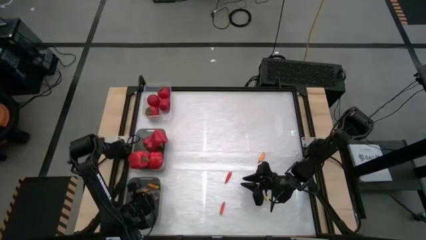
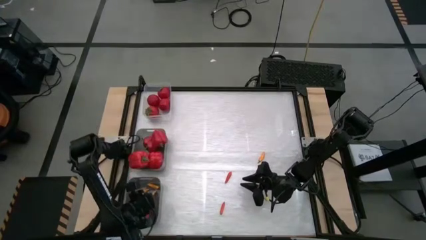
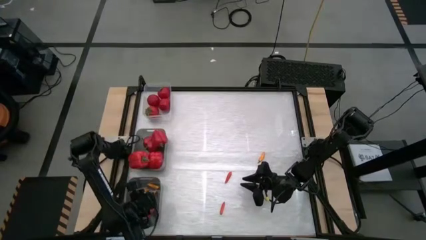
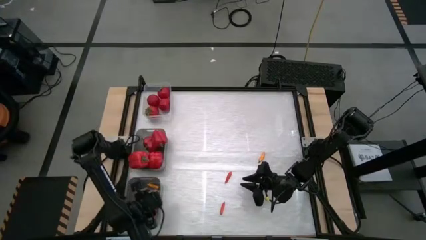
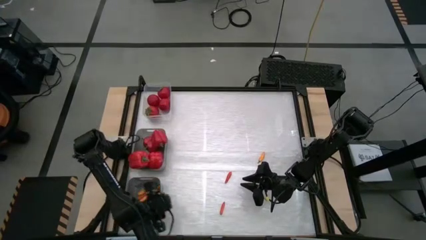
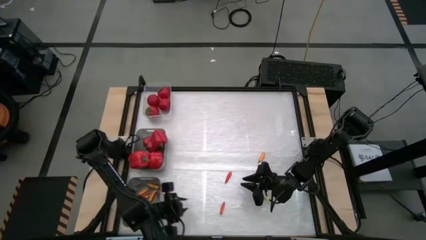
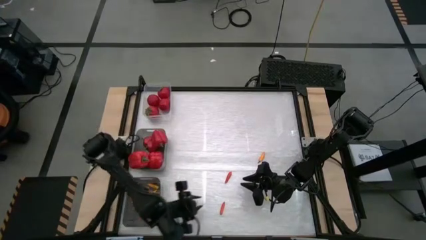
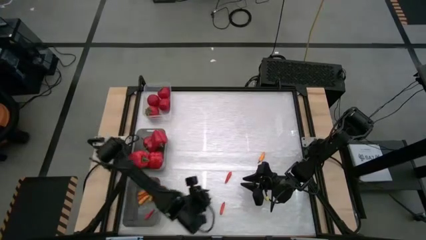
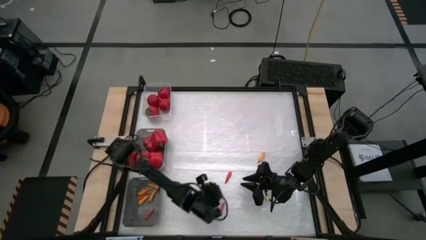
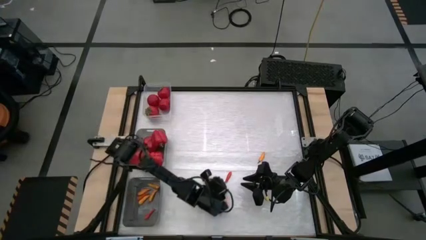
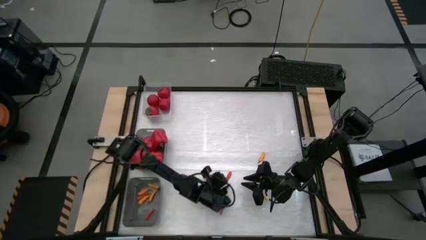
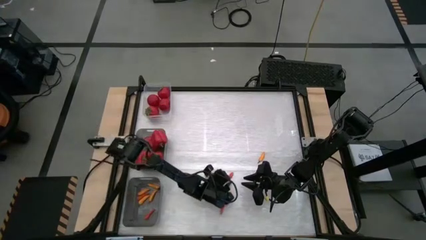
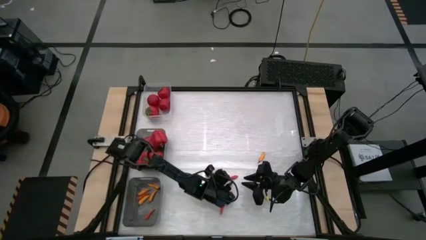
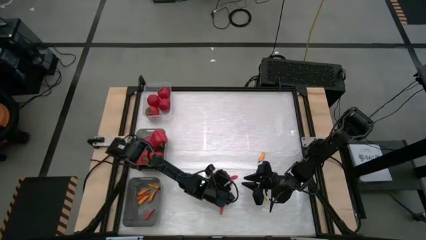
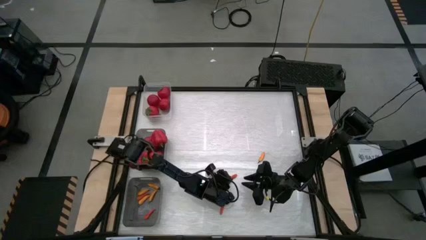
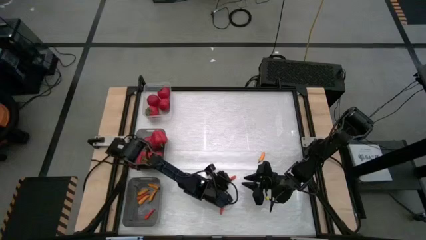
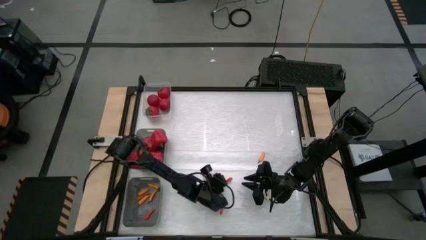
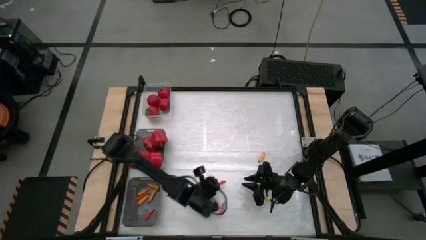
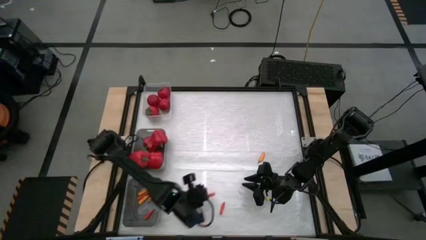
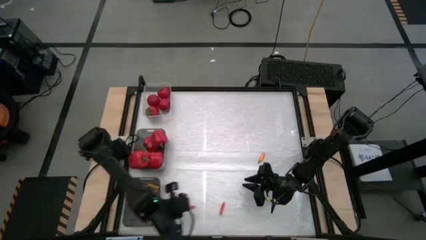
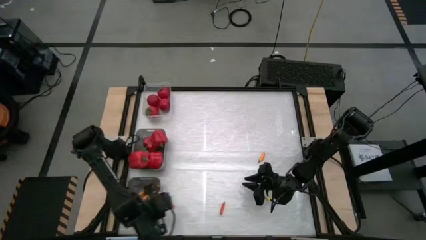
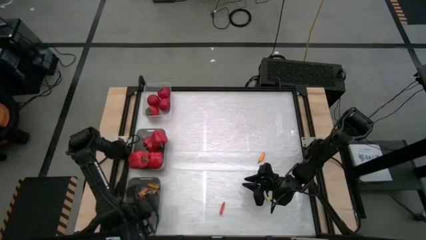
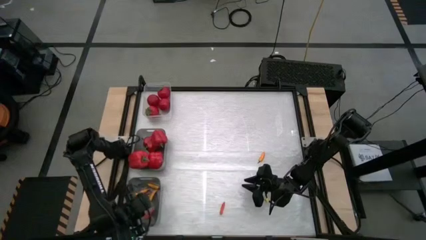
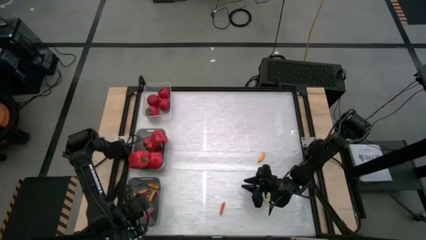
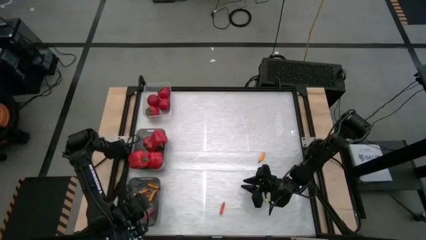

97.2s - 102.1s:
Task: Sort produce into baskets
Put the orange chili pepper into the bottom gray bin

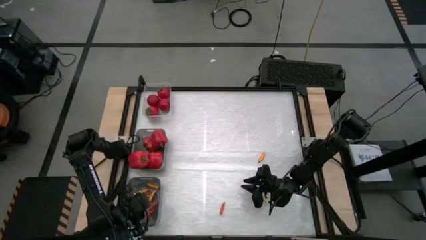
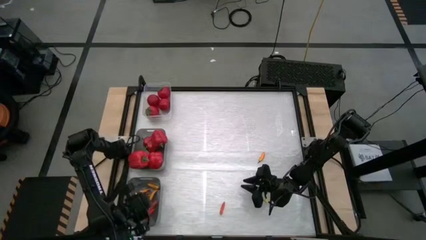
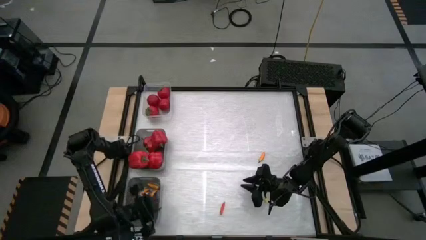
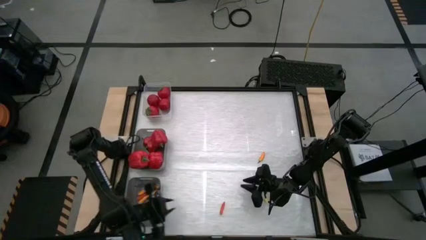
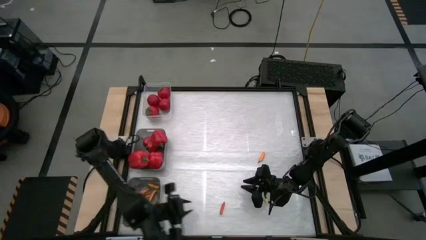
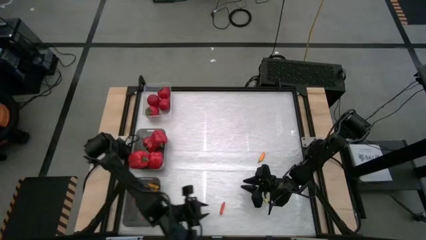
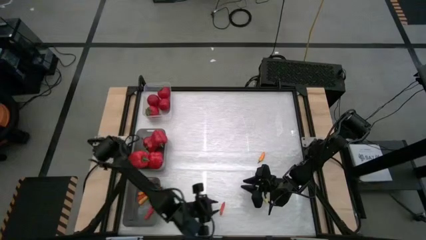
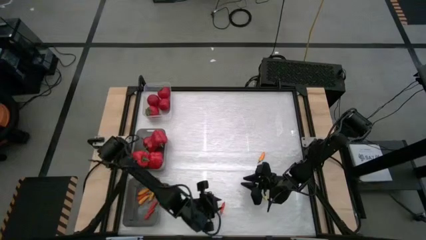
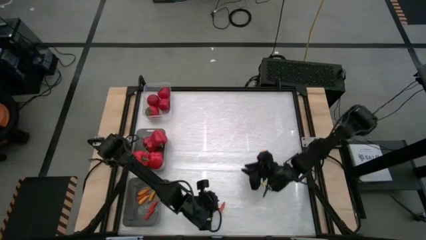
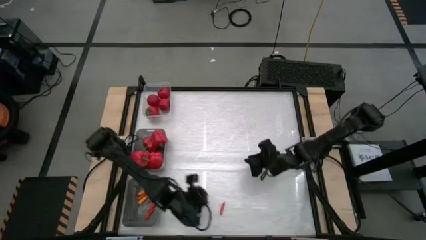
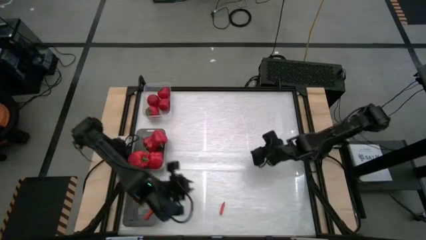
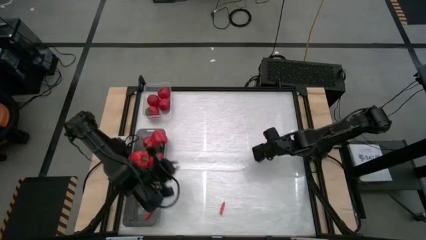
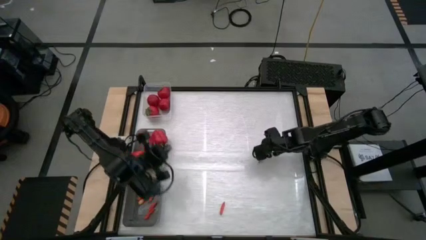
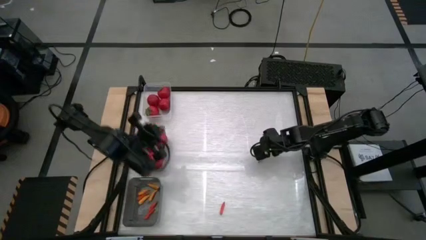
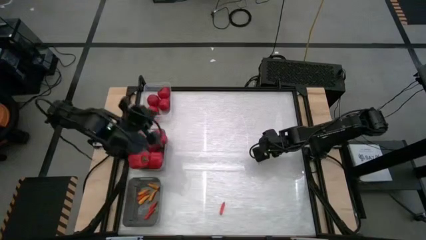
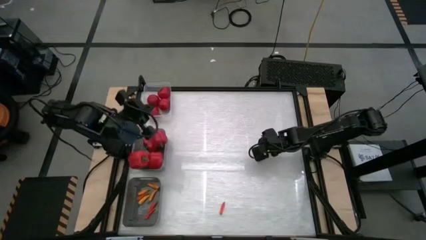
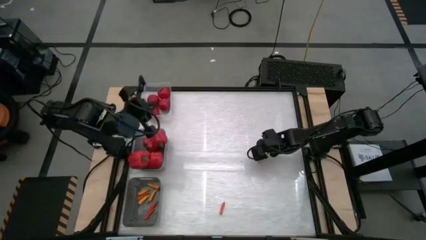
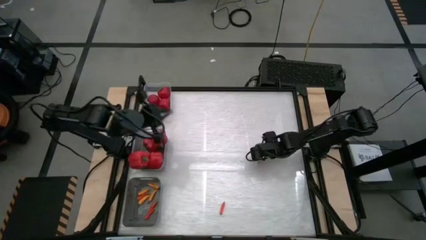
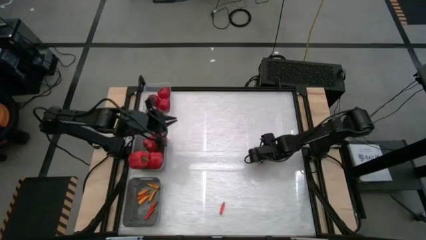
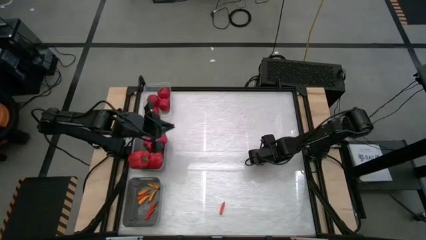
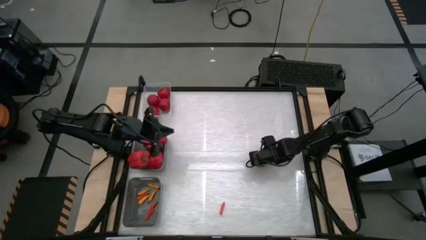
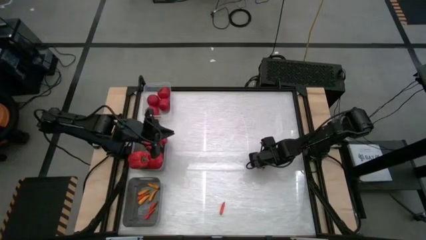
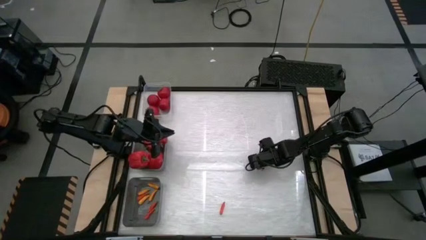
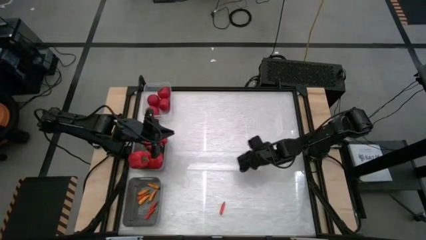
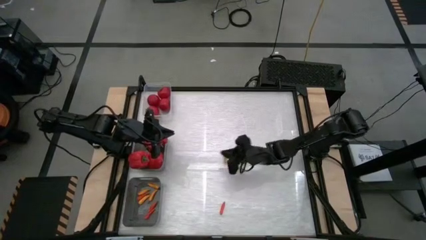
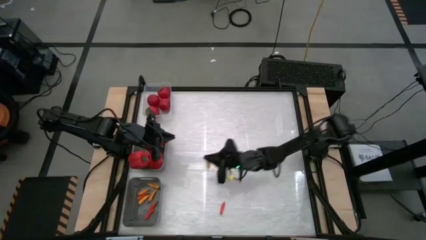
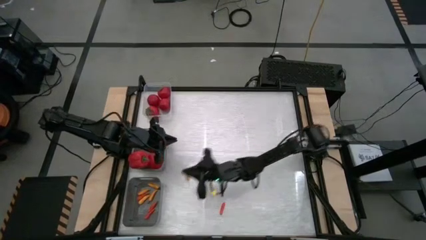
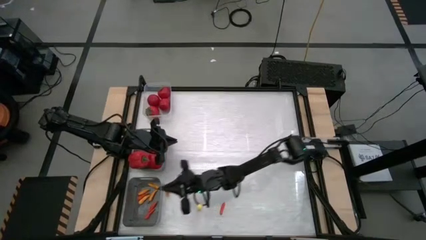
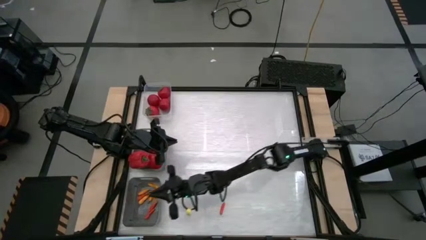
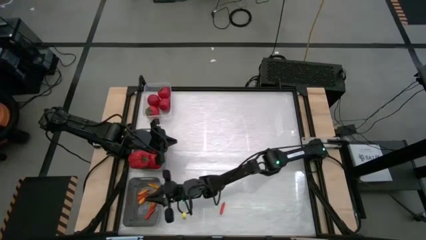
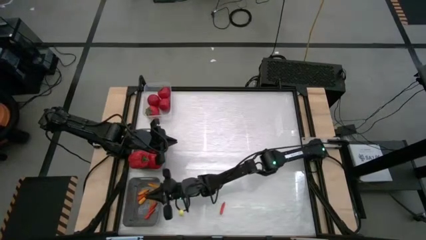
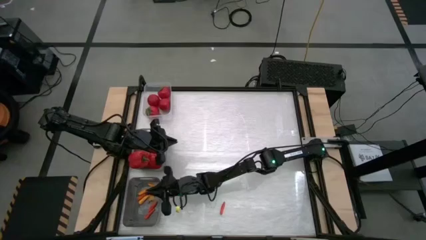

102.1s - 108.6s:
Put the yellow chili pepper into the bottom gray bin

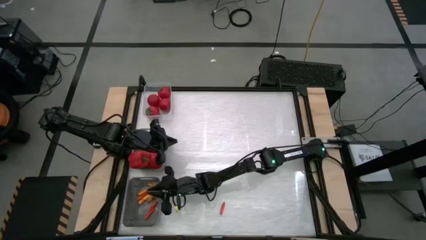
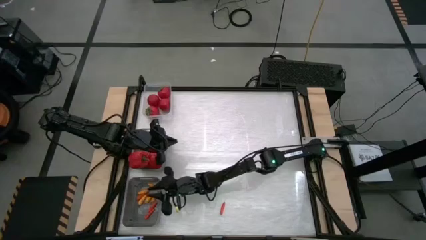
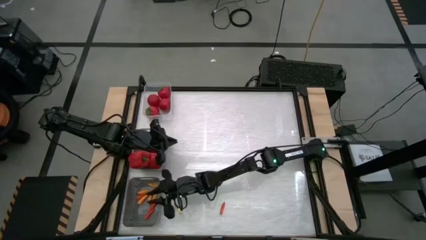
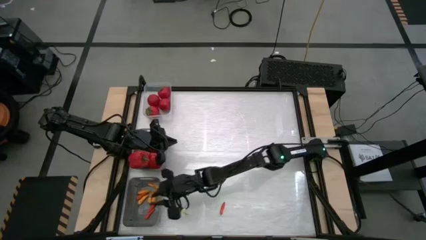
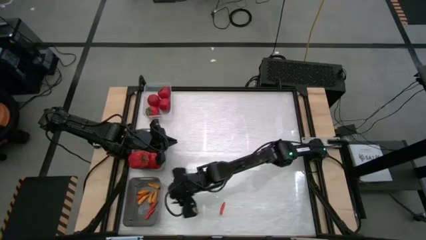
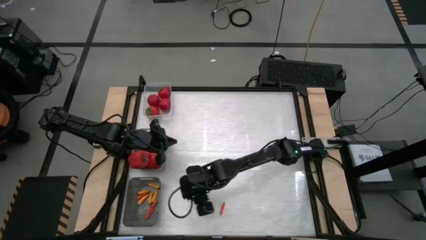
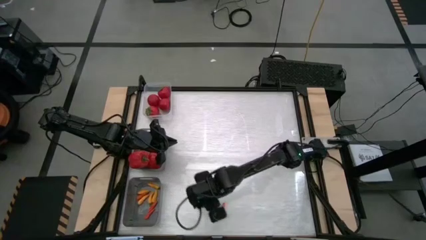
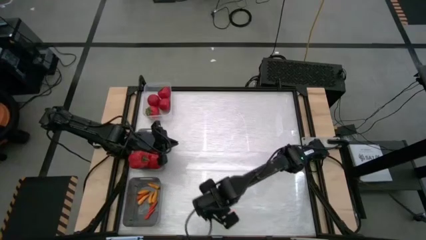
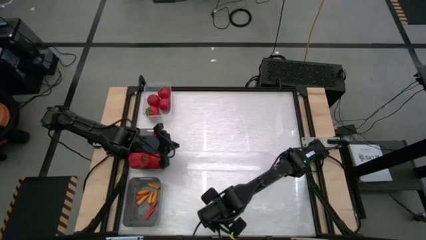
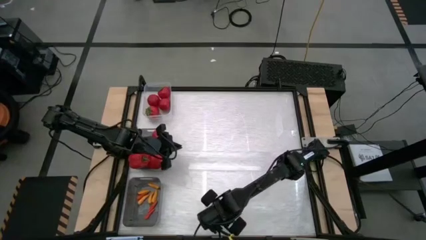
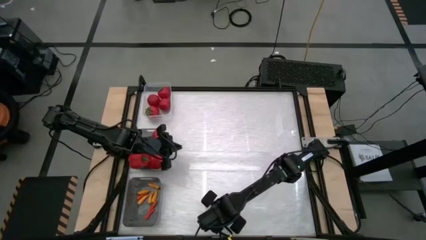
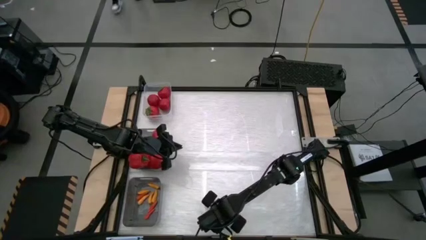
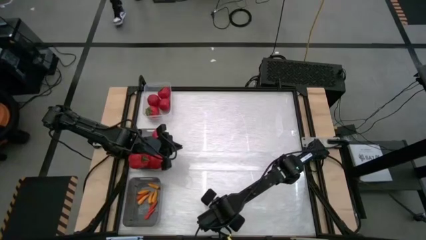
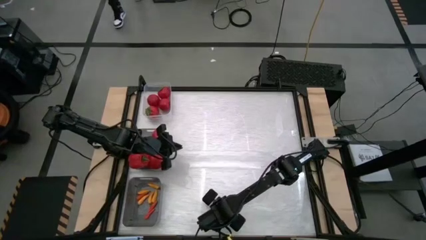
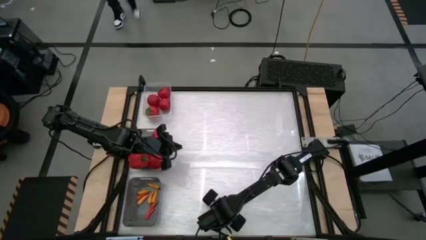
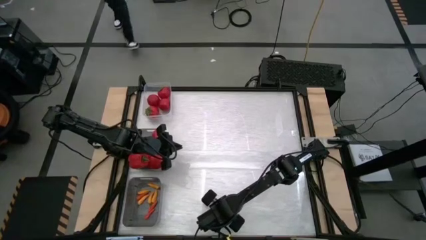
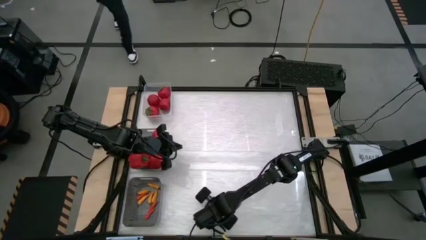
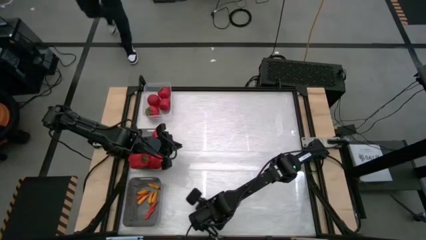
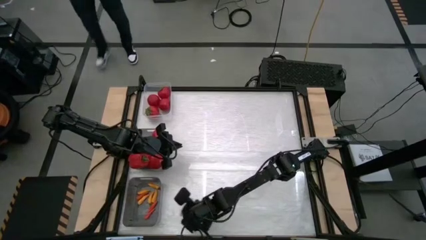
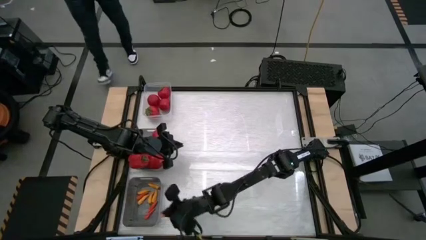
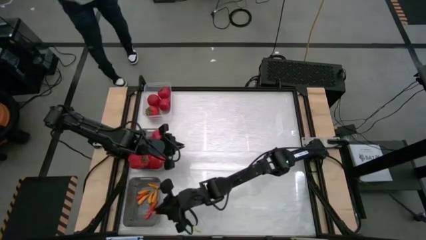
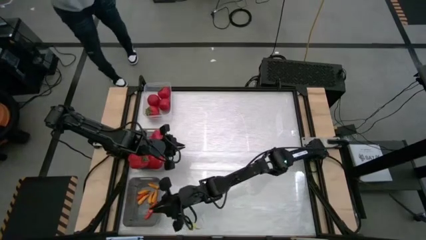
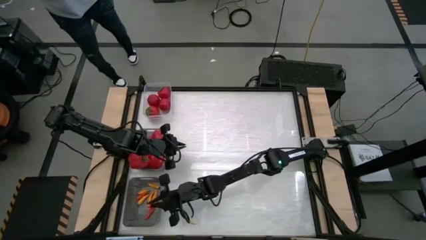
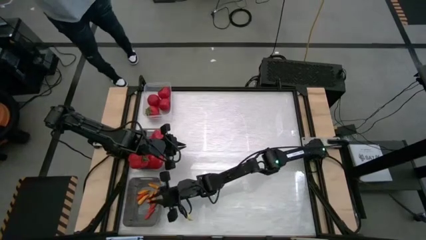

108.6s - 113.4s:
Put the orange chili pepper into the bottom gray bin
